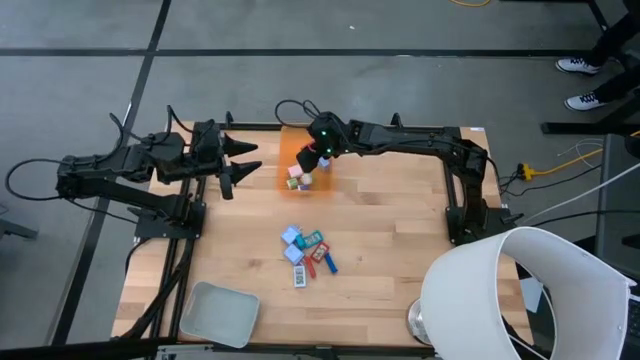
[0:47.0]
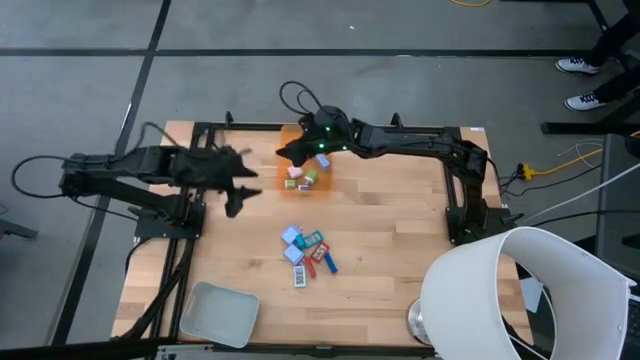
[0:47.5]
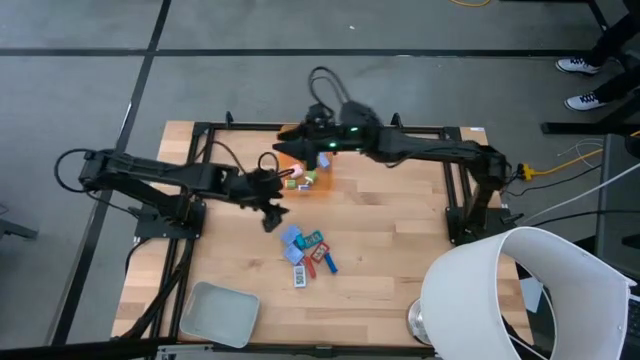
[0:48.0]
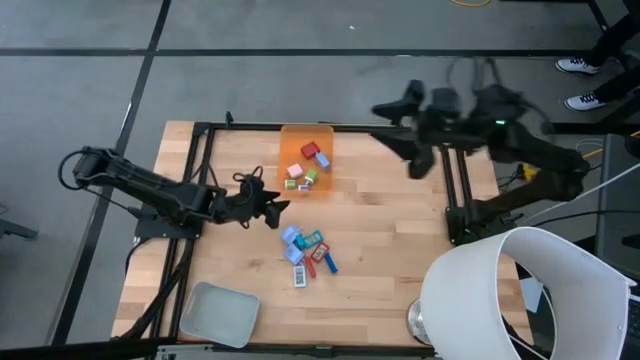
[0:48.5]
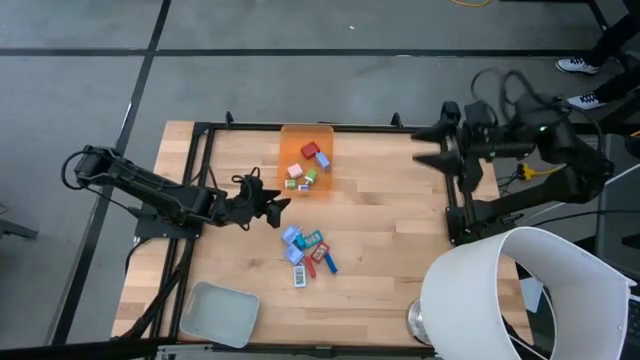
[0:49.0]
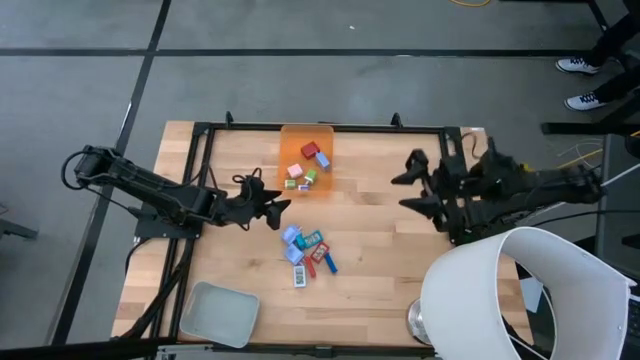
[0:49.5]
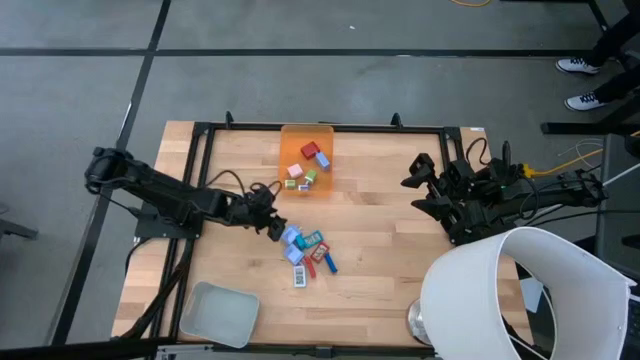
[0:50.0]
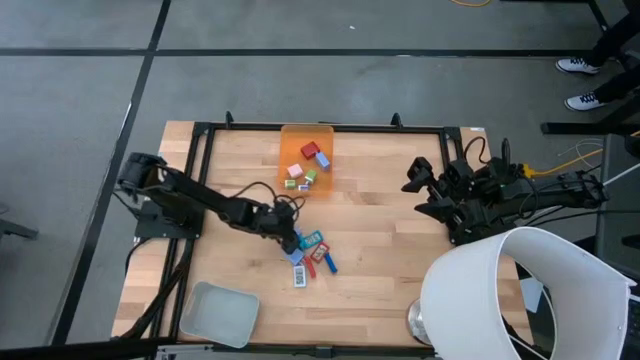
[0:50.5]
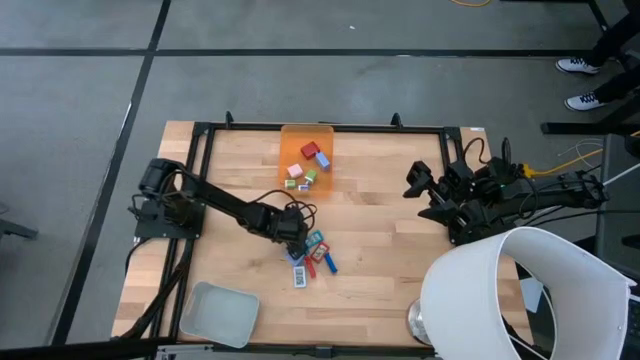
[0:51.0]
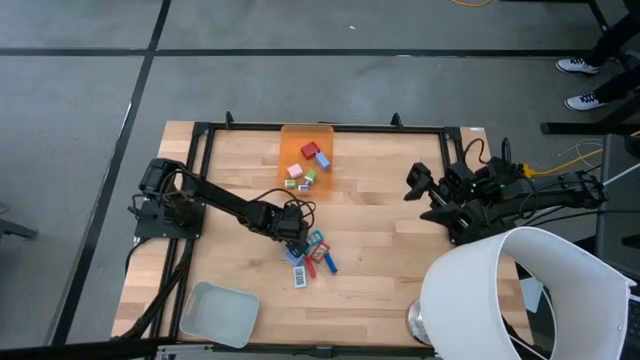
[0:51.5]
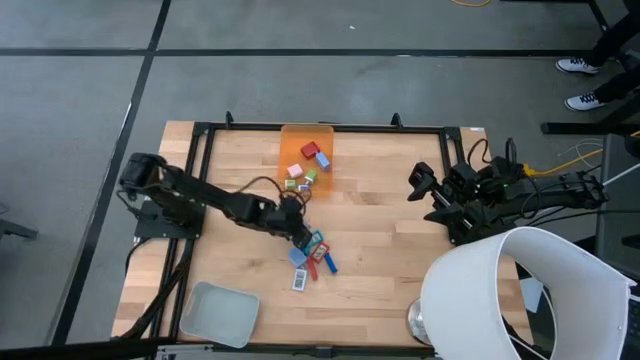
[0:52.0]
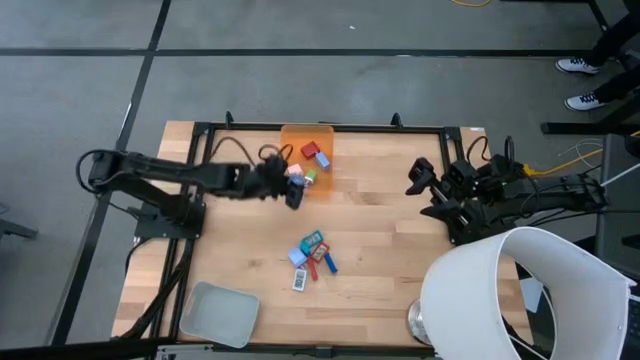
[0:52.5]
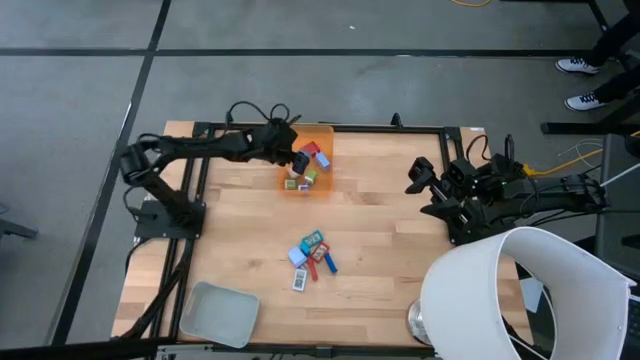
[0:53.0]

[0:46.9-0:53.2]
Task: Pick & Place Office items
Put the top light blue charger adapter into the orange bin

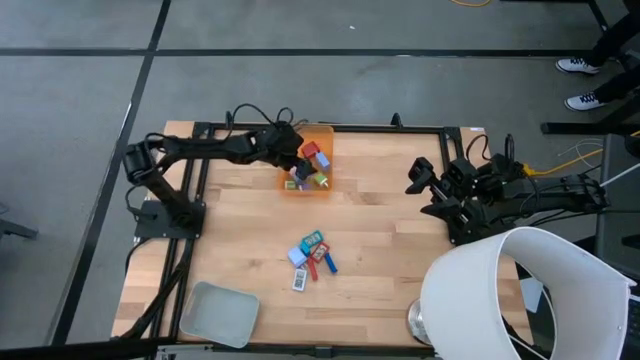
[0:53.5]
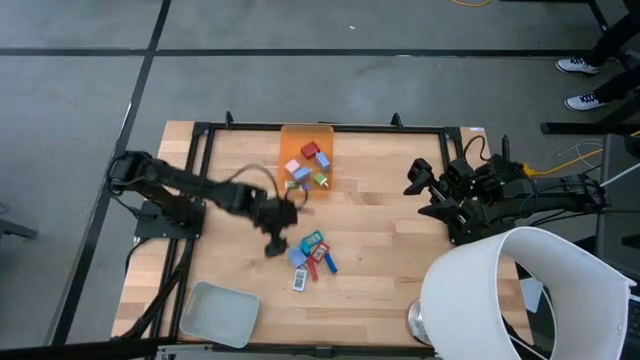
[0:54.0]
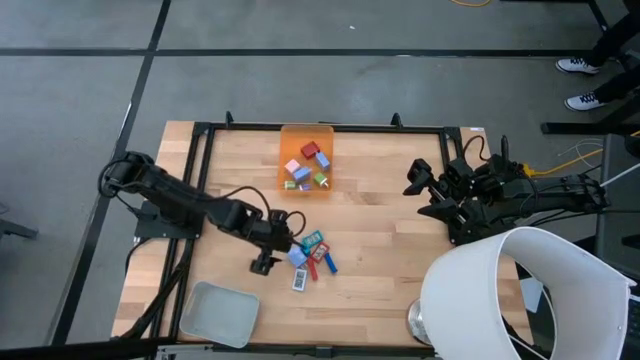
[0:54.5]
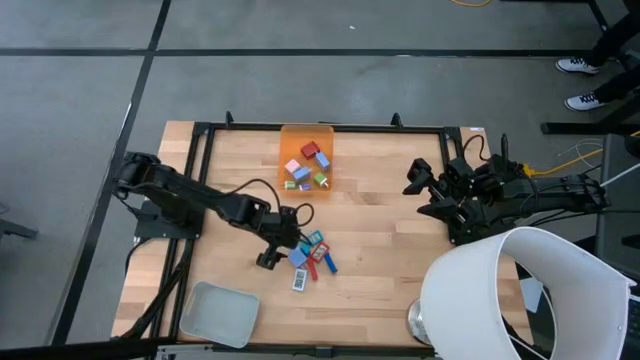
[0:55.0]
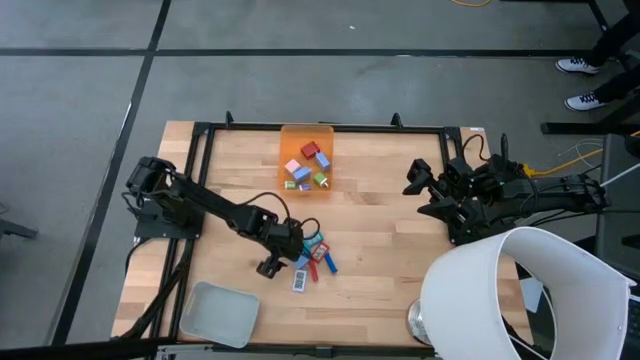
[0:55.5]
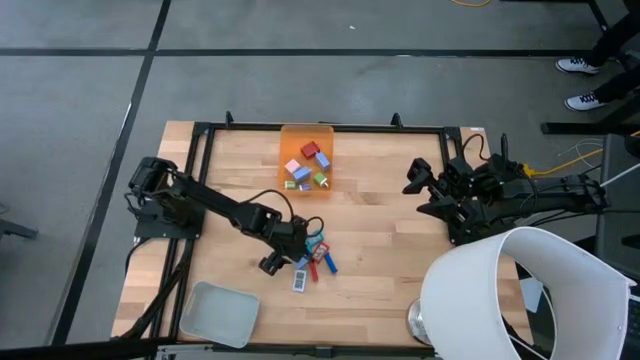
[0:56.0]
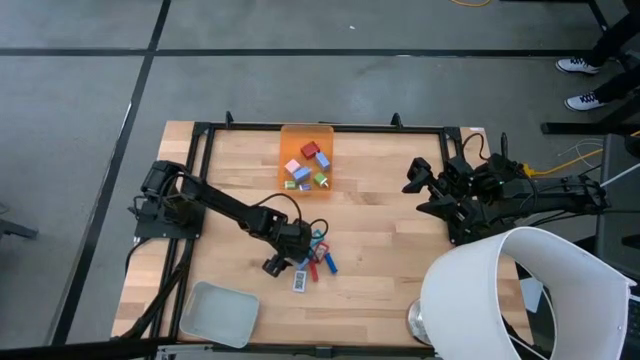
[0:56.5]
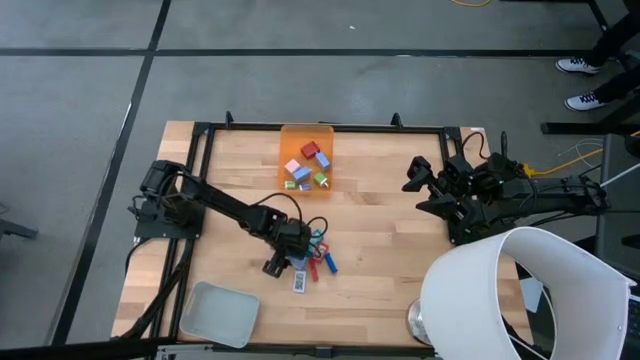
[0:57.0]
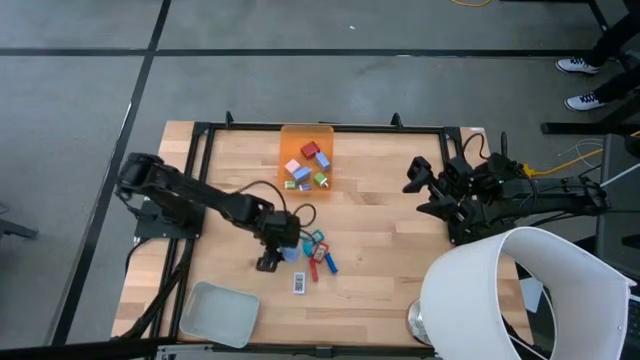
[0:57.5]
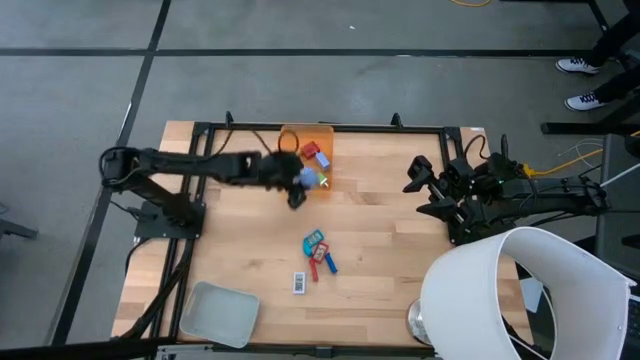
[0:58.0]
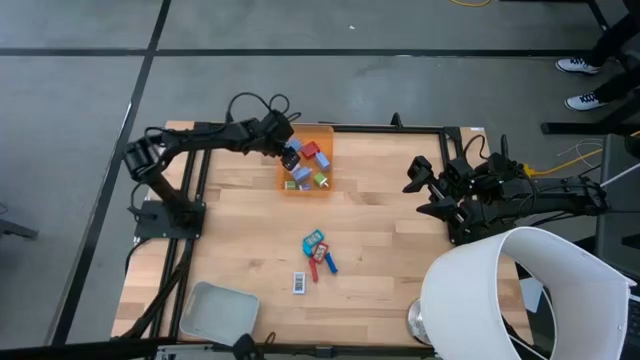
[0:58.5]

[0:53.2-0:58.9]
Put the light blue charger adapter into the orange bin

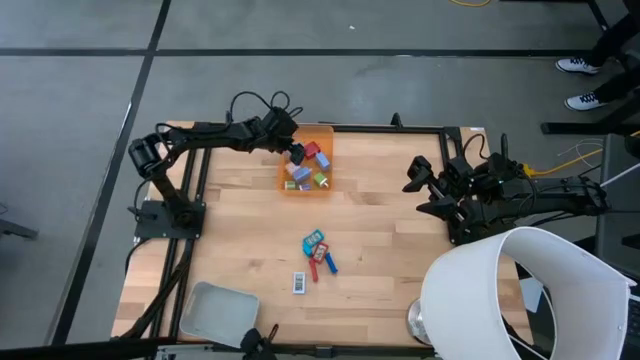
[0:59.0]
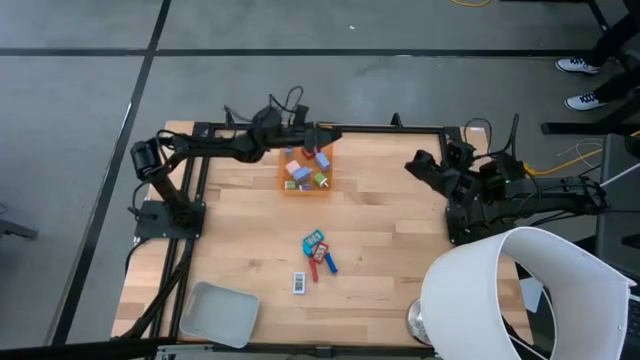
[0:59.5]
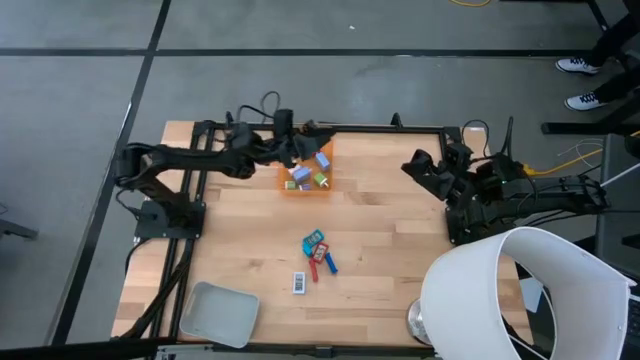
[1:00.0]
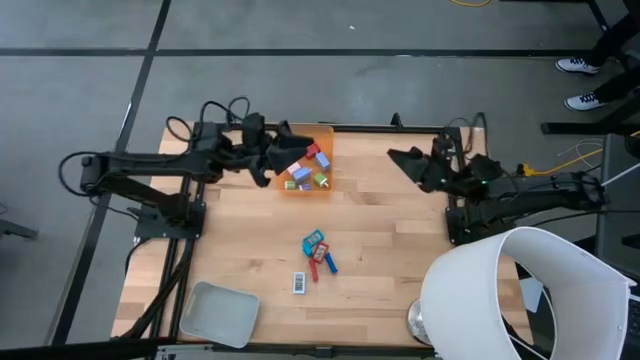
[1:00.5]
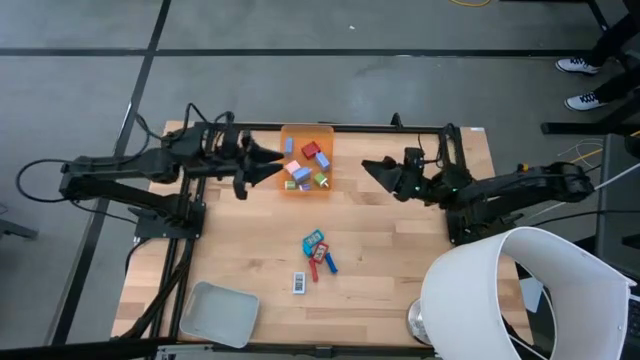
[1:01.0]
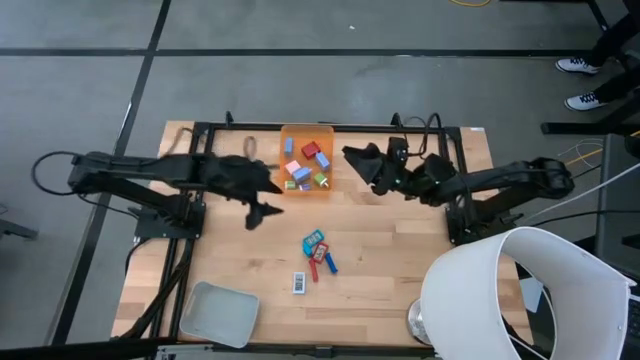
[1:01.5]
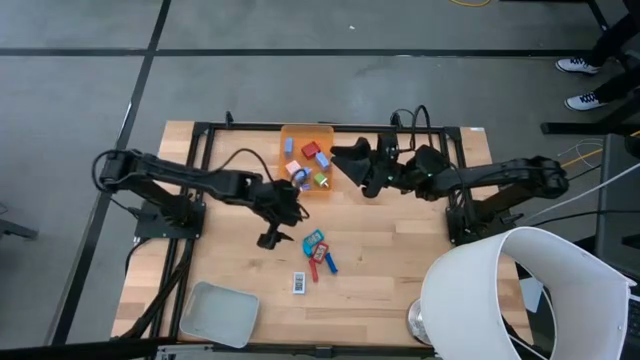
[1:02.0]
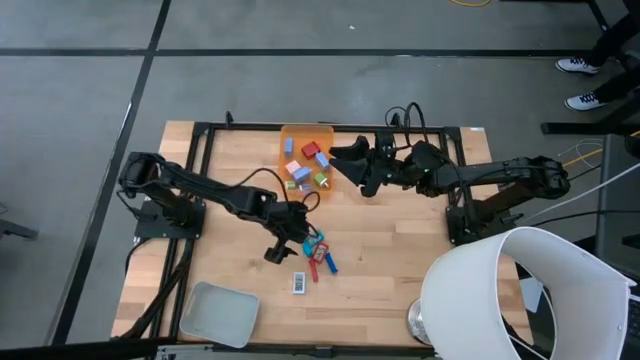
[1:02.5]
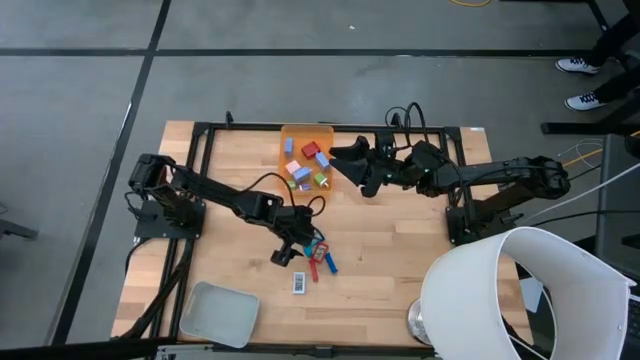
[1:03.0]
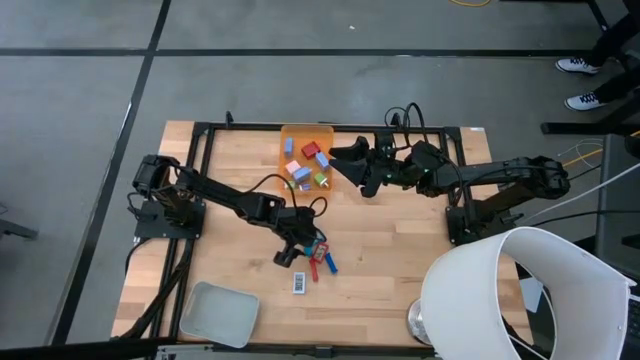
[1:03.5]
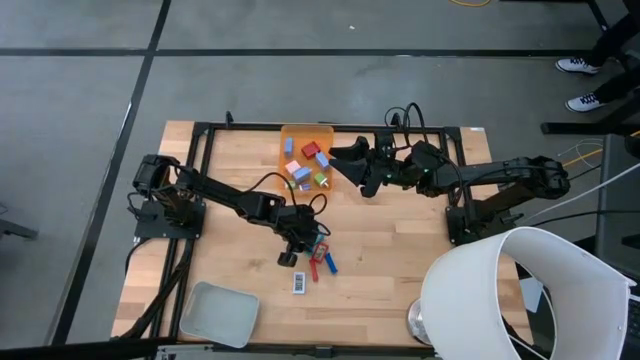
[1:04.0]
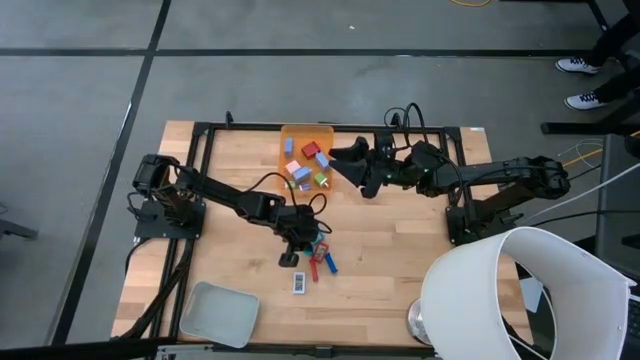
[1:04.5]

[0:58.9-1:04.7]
Put the bottom light blue digital clock into the gray bin

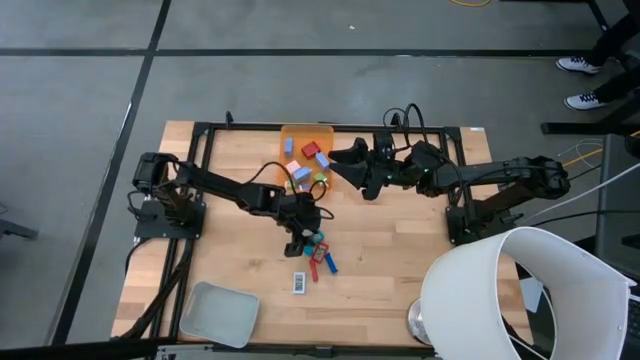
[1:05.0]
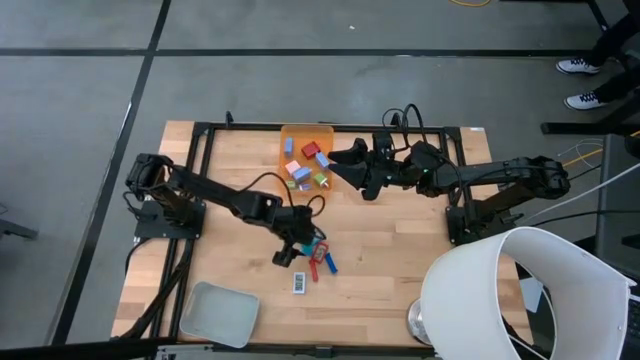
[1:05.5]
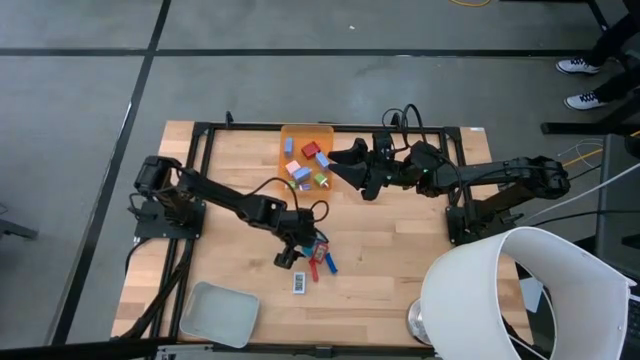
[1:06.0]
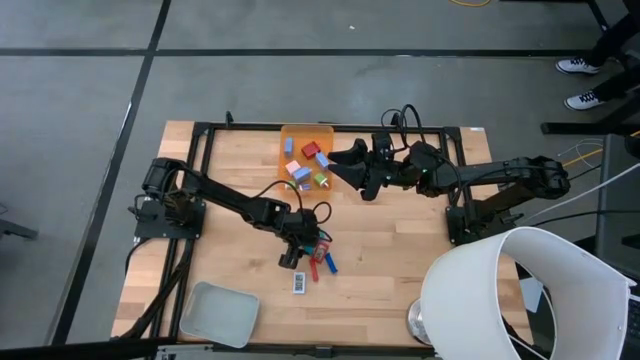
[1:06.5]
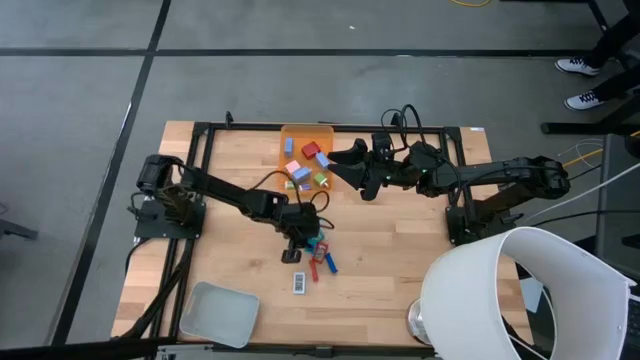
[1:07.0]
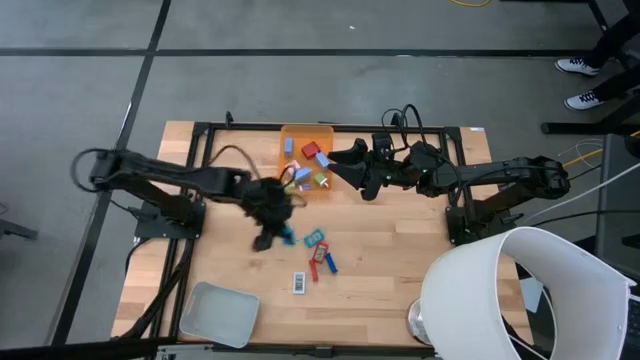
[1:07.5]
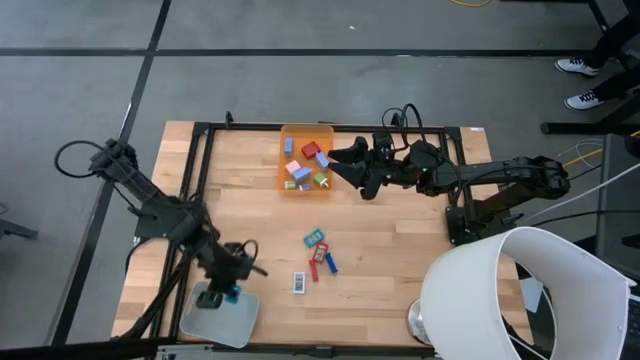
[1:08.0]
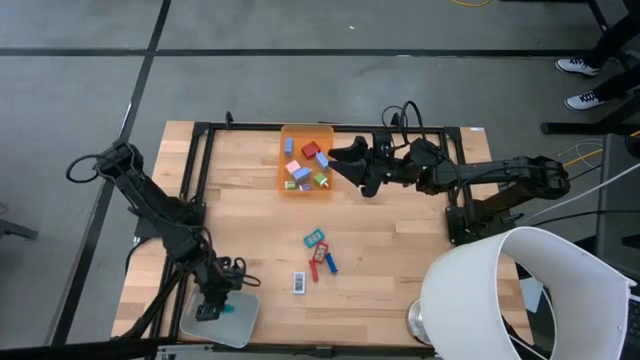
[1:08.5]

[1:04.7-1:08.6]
Put the bottom light blue digital clock into the gray bin
